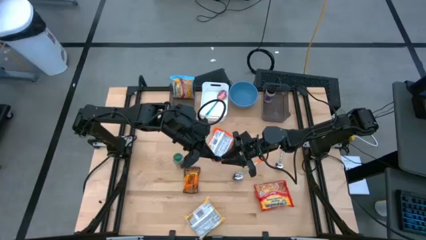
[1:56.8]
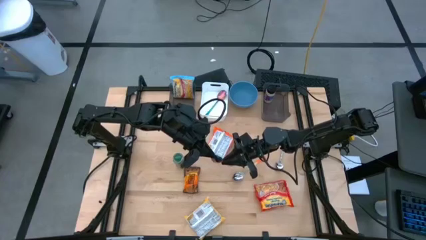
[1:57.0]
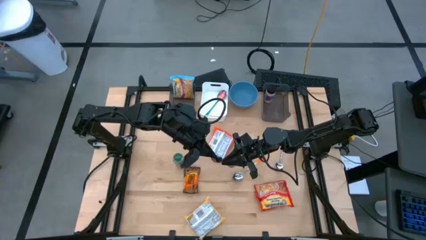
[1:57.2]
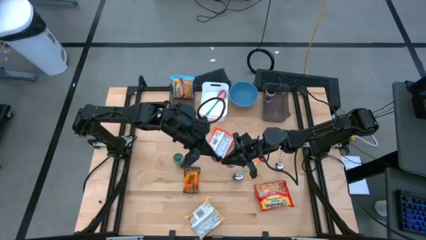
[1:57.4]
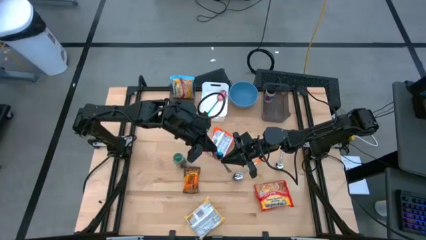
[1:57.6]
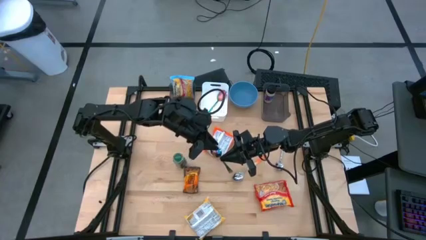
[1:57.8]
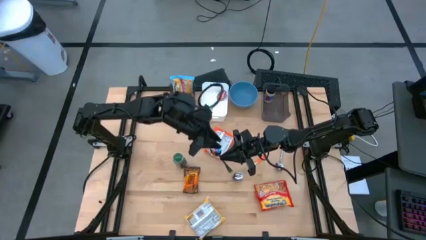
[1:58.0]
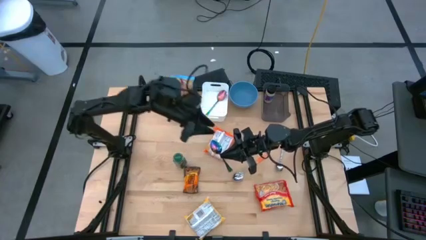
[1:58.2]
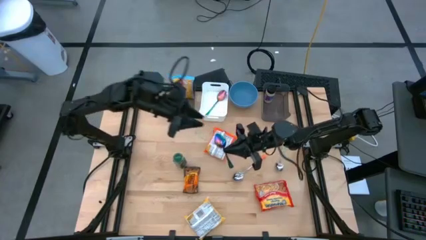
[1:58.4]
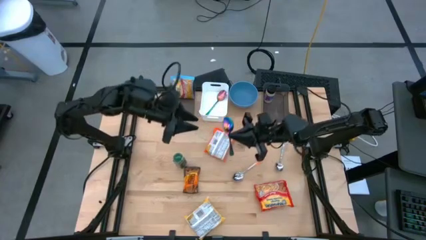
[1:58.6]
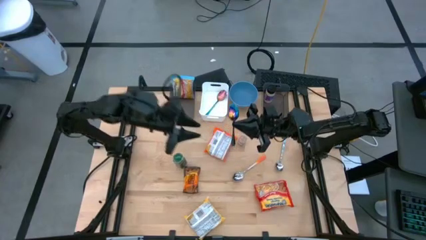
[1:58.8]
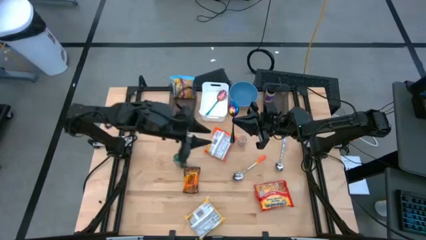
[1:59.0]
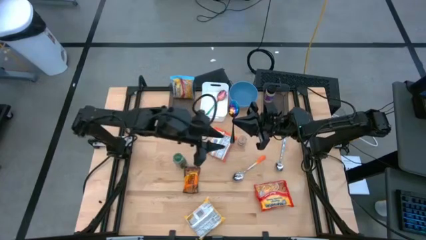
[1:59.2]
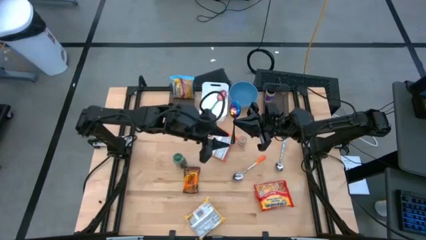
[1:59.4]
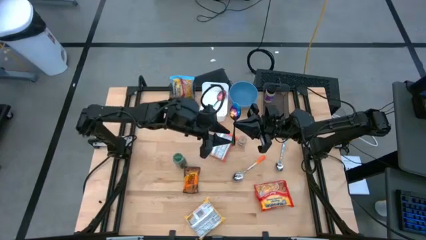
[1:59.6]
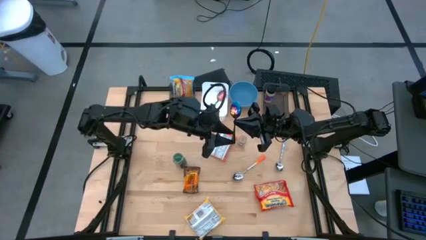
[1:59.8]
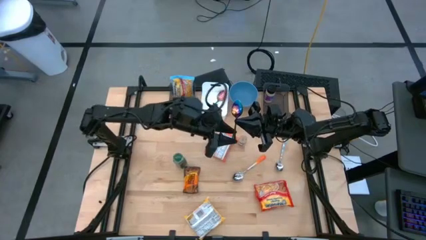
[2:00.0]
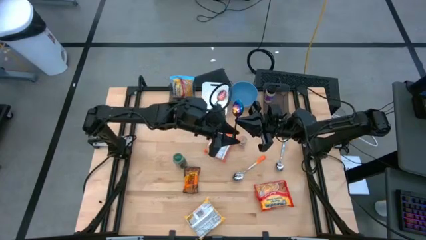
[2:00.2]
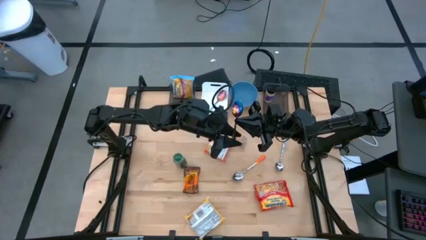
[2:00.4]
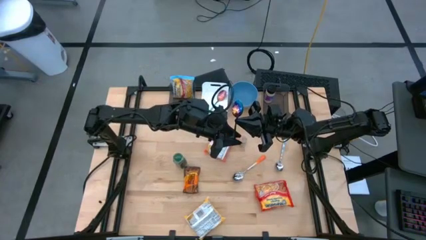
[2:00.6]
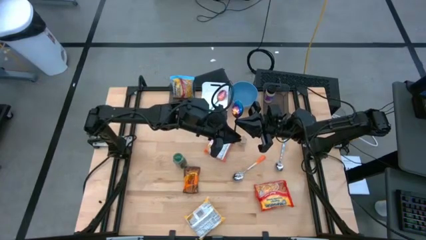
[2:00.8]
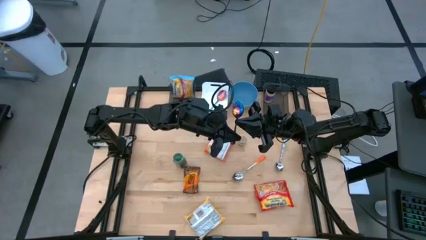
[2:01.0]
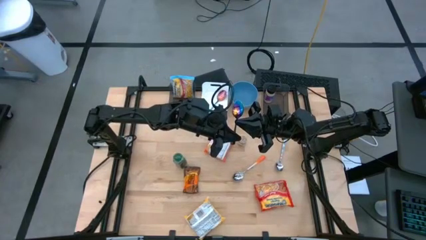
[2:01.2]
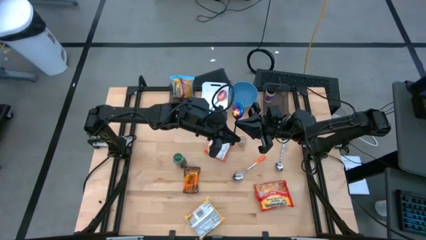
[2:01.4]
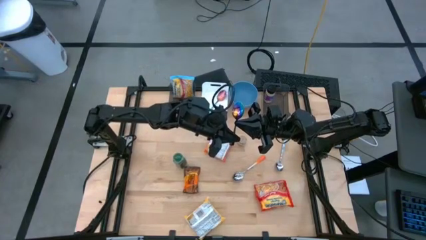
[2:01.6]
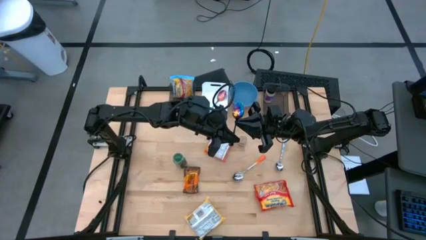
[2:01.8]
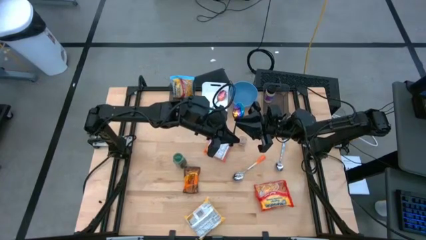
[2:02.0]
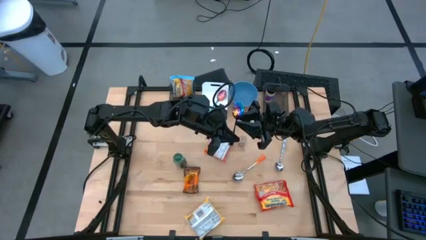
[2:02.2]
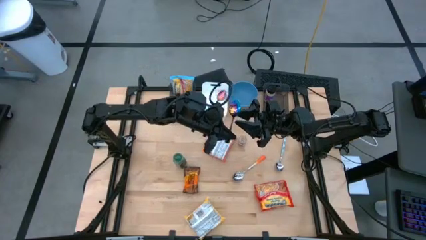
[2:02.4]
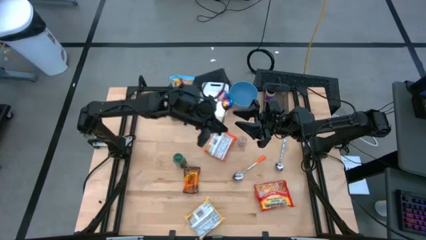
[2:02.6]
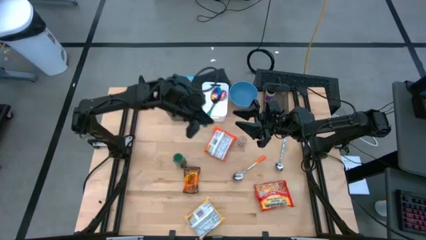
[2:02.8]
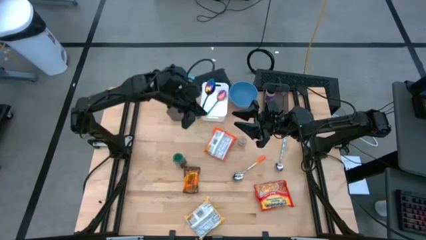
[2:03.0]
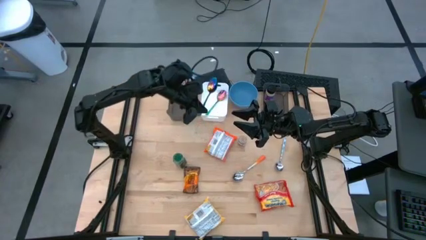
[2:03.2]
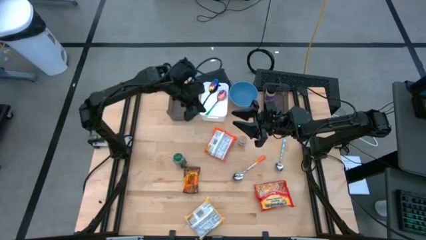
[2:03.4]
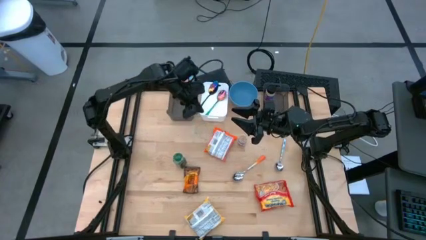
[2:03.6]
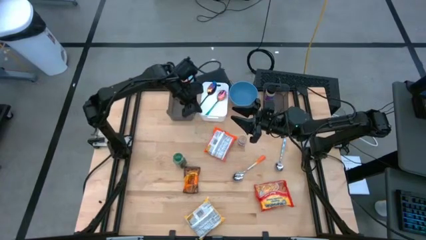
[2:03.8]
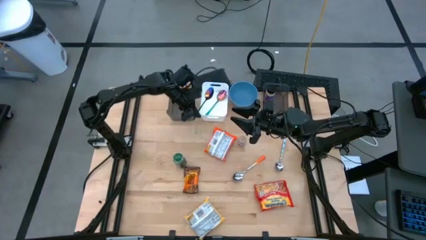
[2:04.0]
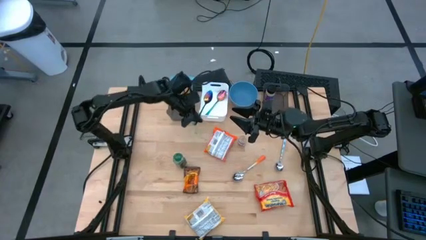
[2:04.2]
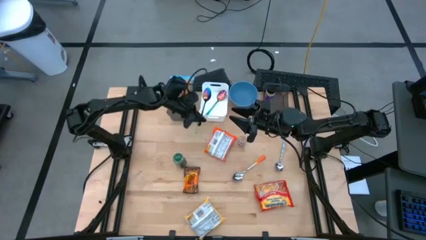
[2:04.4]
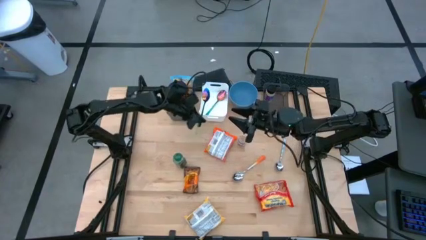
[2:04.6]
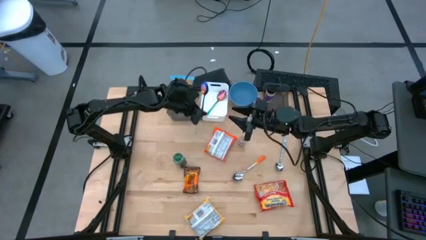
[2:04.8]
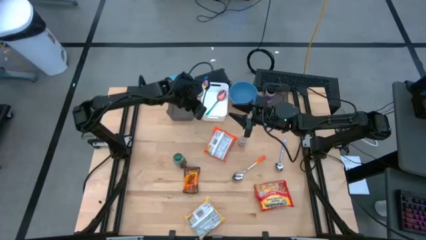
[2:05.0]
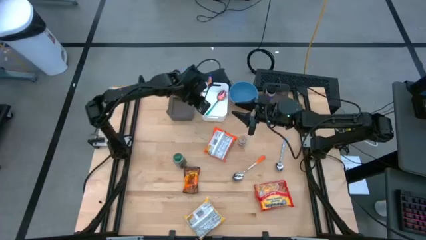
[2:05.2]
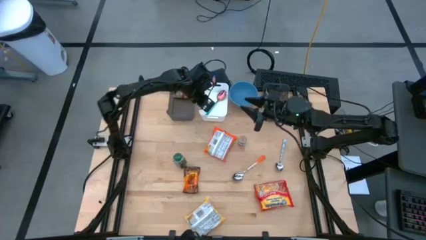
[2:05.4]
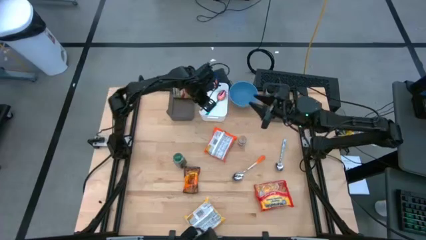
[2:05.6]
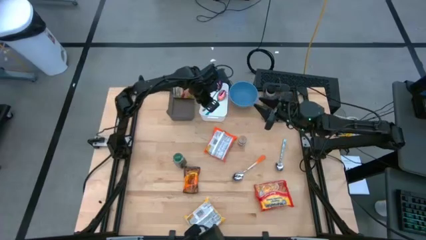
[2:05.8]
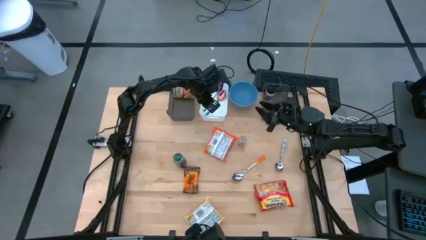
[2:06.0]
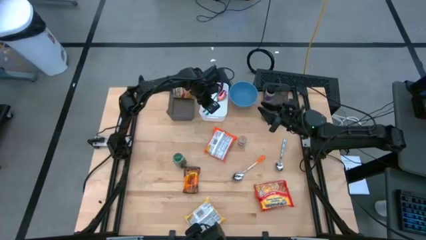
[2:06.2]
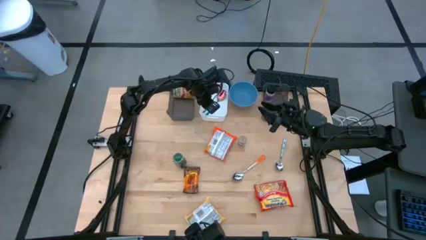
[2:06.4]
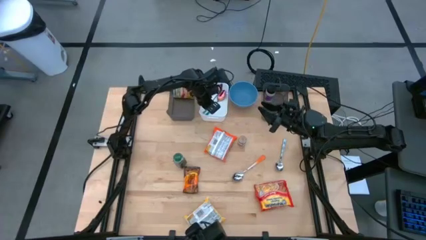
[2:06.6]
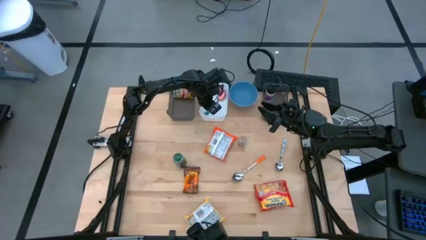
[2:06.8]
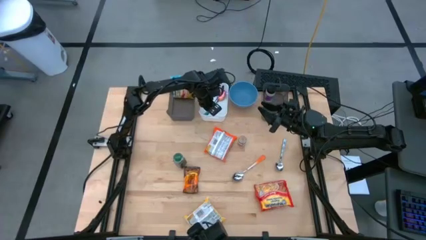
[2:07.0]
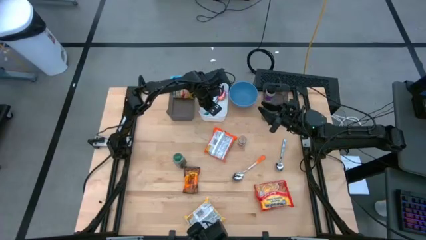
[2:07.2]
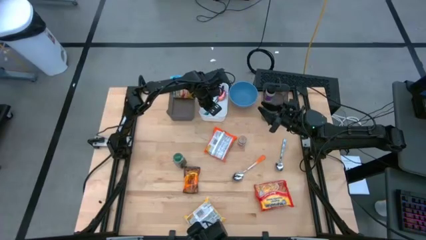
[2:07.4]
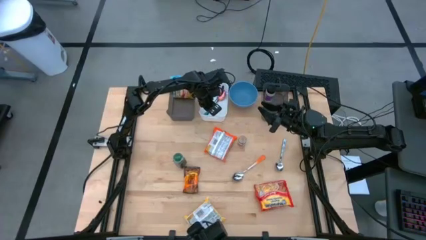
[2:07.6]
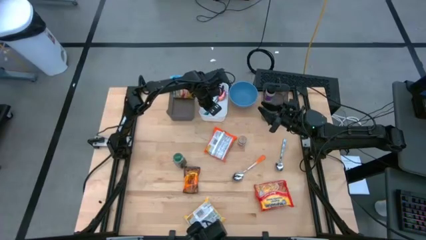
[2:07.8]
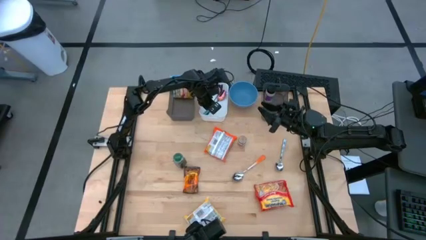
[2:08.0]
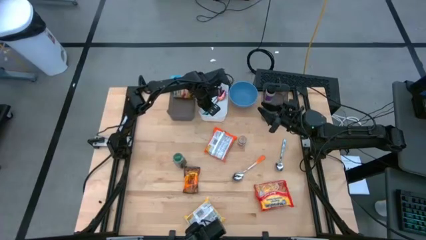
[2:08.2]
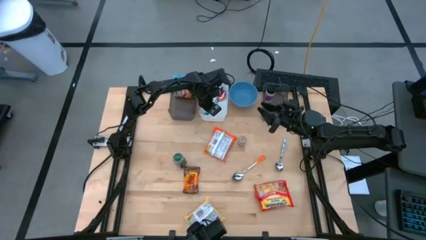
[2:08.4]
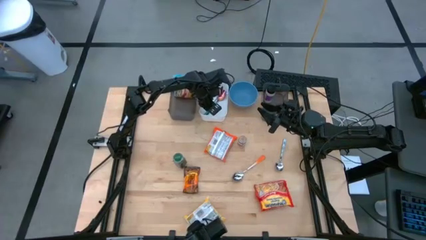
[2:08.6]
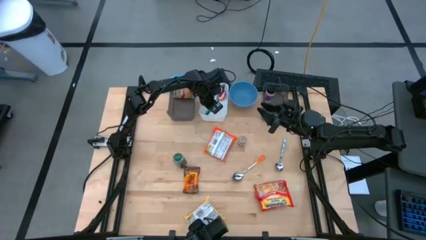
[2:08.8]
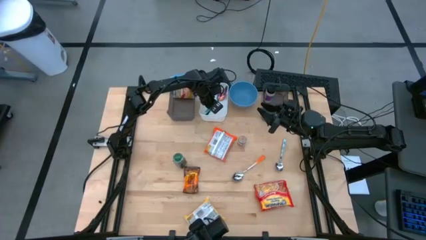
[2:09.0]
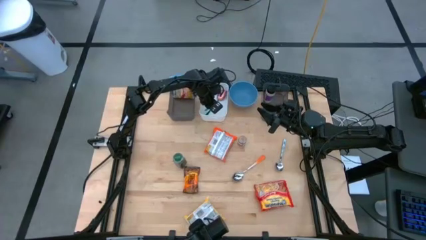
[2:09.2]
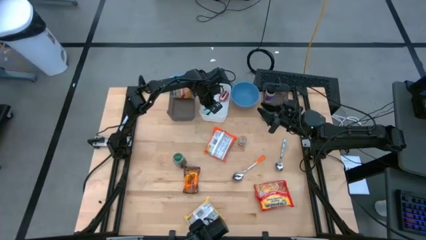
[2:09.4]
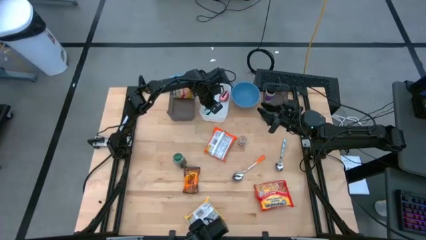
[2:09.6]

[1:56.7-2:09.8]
Task: Pick & Place Food Item
Put the blue spoon into the white bin

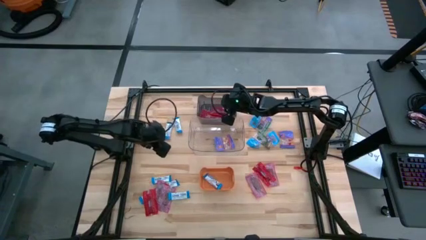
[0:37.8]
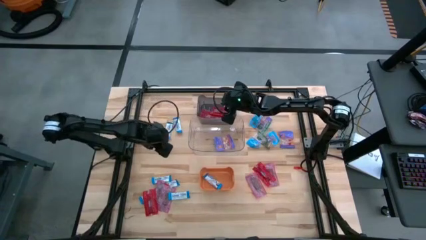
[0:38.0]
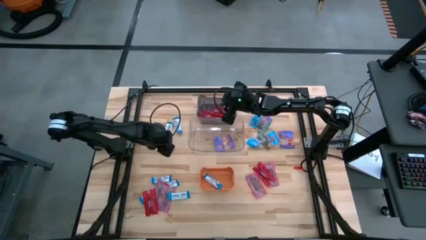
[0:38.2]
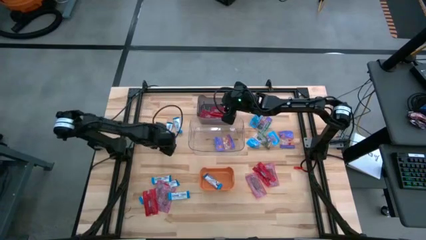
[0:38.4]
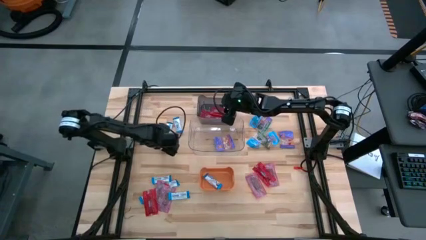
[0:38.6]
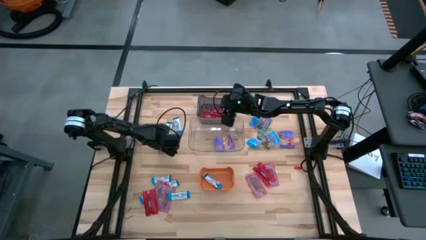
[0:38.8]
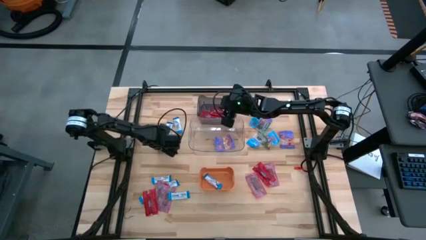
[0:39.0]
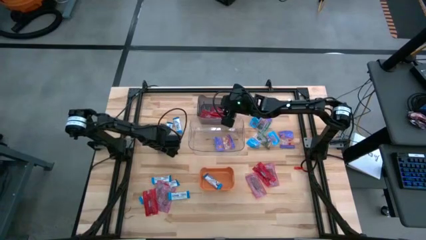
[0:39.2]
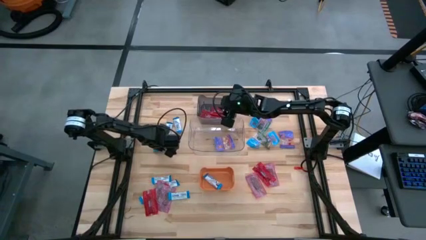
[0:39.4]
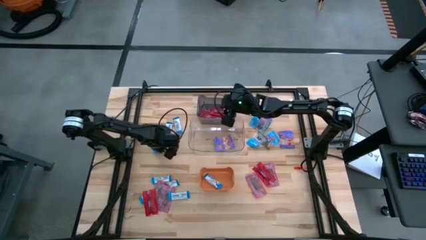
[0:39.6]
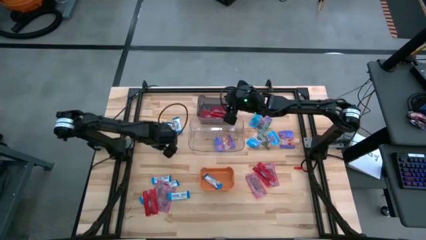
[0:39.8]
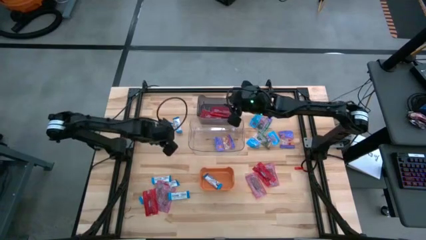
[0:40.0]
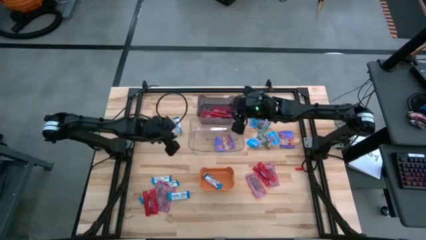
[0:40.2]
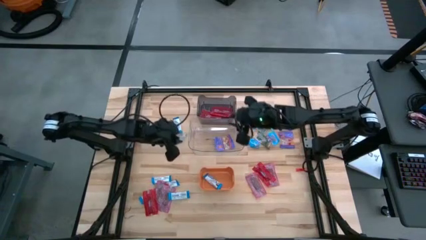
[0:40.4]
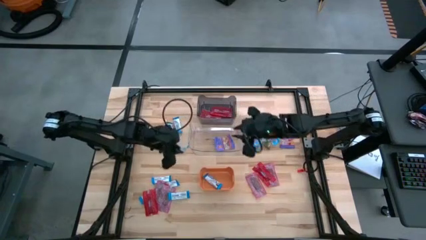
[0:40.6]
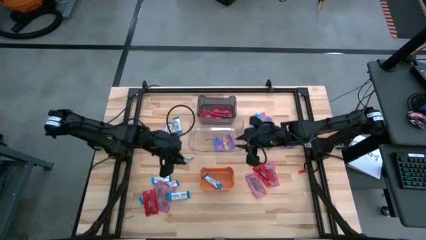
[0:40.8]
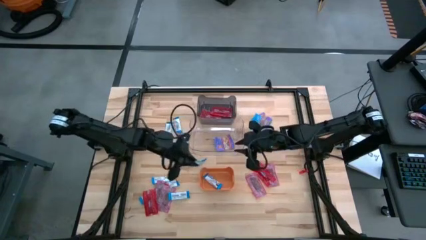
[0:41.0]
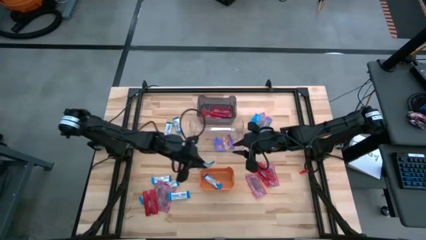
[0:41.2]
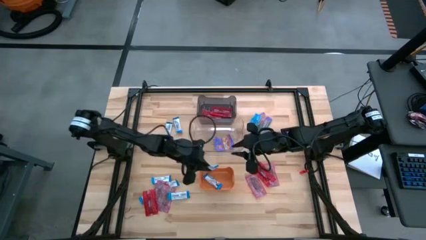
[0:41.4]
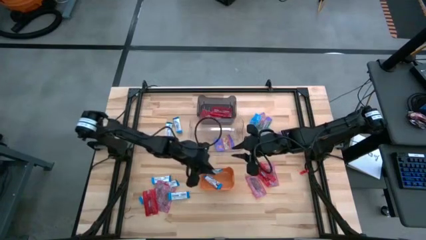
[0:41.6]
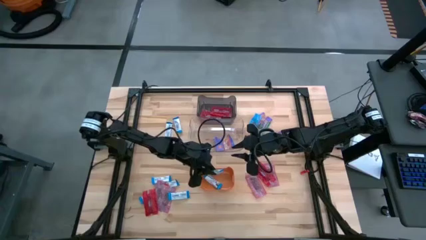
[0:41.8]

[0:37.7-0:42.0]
Task: Sort candy
Put the white candy into the orange bin
